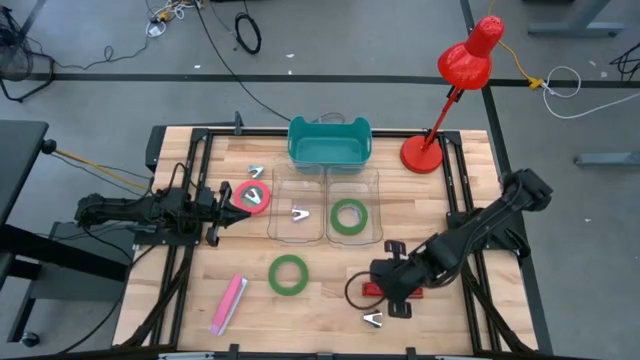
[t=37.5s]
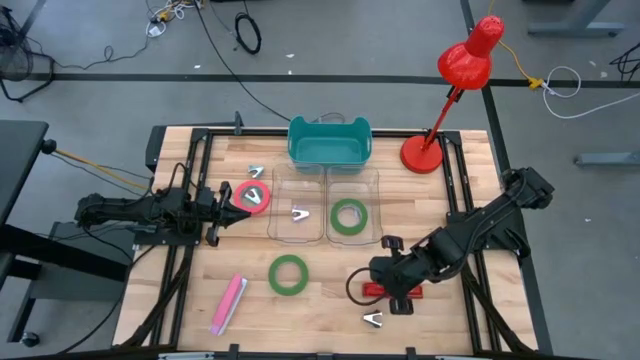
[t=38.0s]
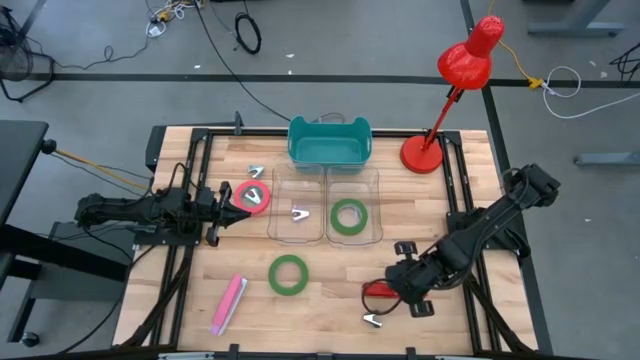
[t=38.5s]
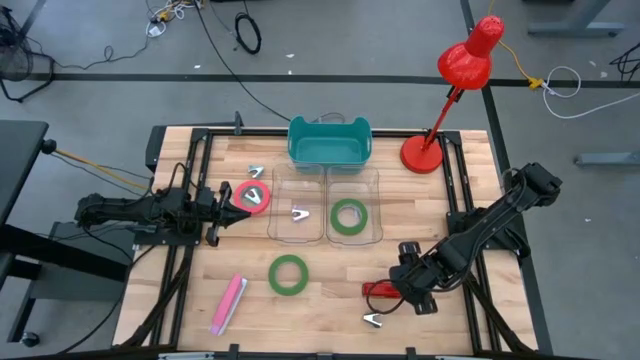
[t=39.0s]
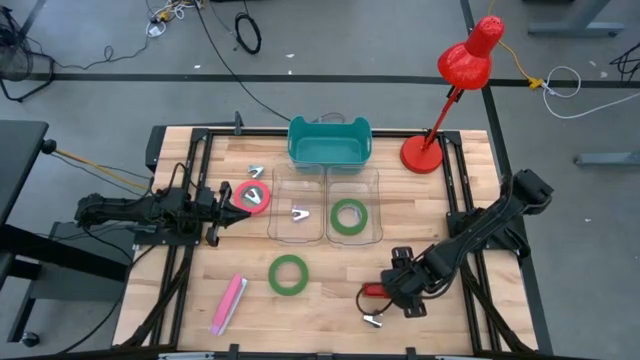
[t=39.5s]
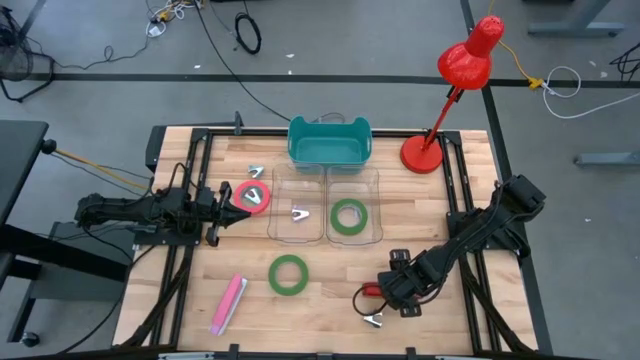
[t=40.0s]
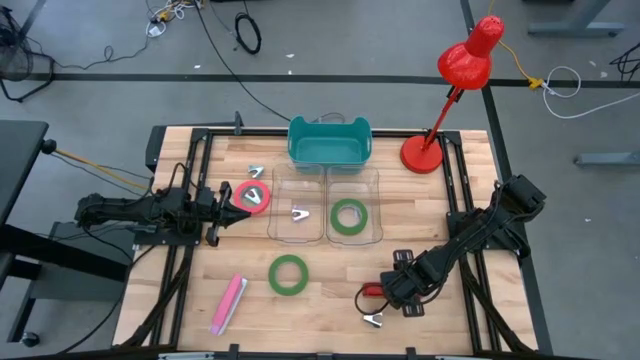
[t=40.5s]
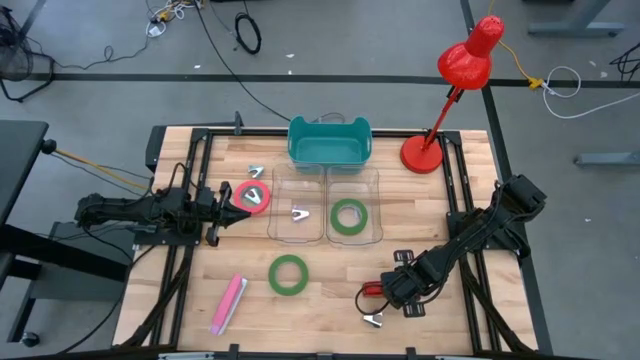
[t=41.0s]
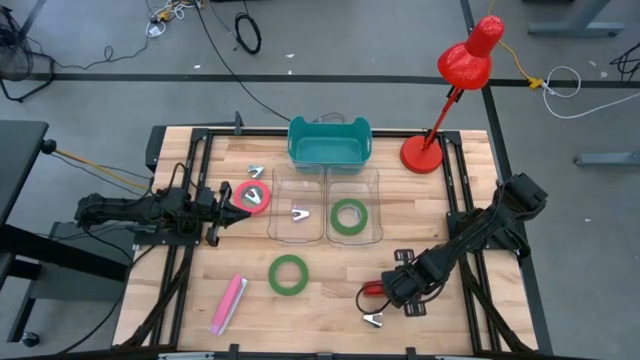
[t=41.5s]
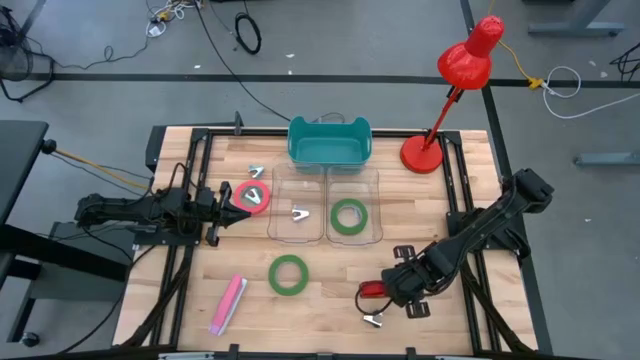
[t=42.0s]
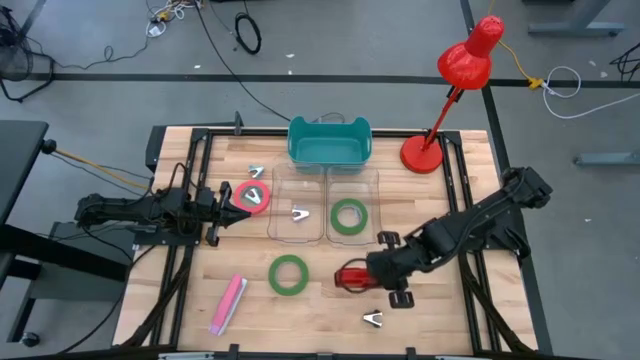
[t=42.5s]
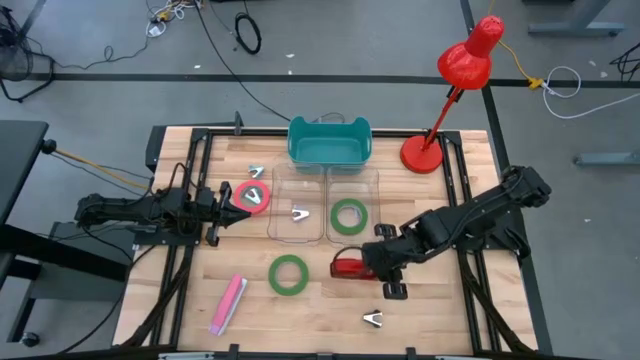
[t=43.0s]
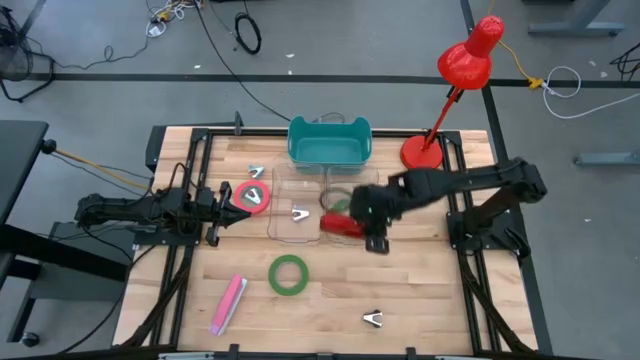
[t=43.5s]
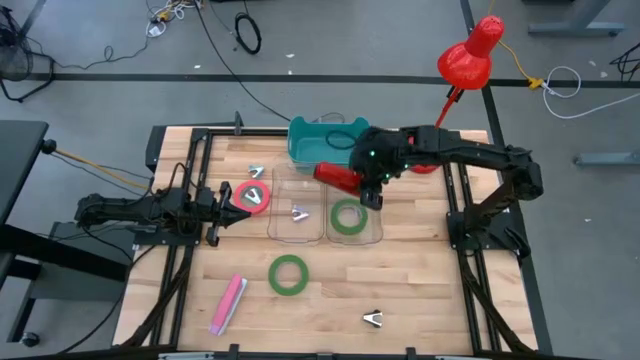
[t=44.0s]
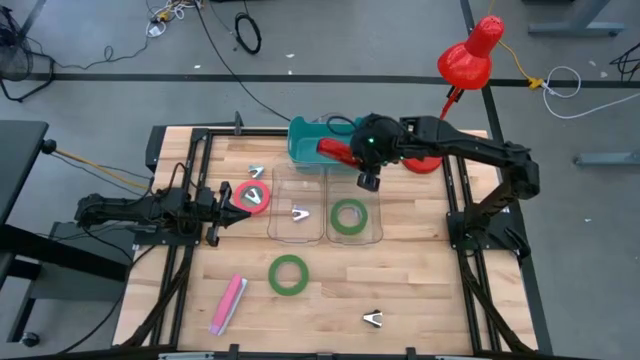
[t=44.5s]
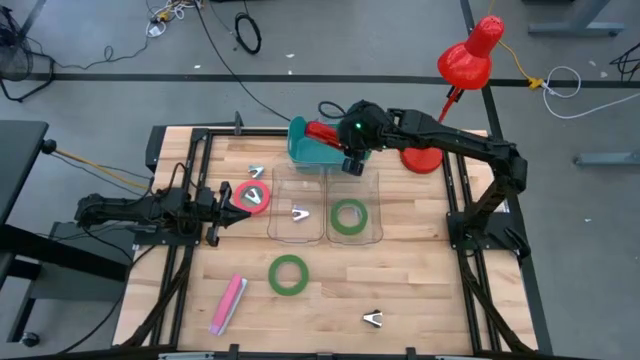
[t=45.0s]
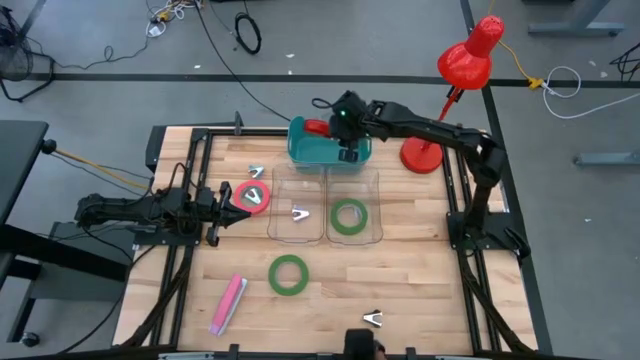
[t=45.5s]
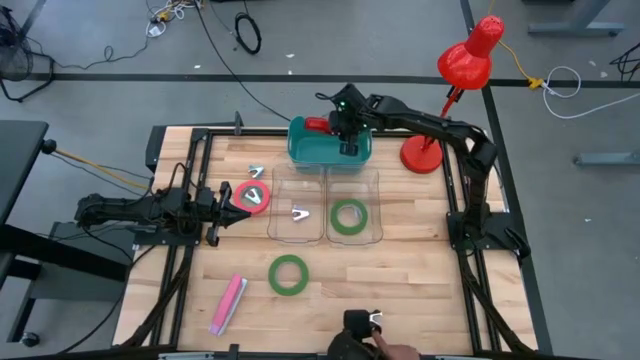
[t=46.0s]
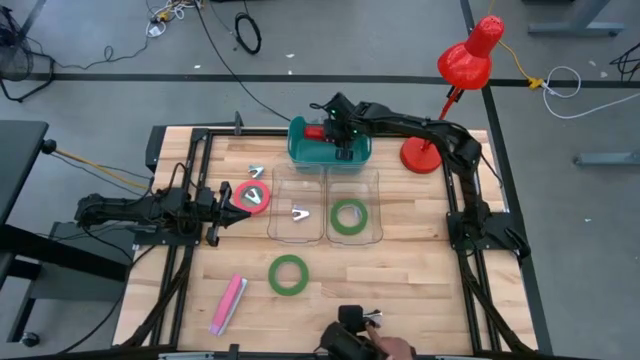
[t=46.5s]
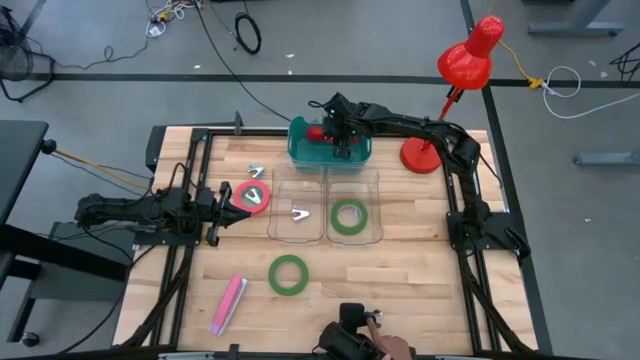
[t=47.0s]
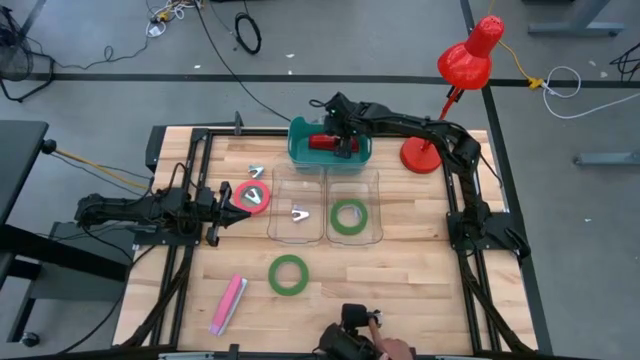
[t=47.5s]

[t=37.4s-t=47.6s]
Task: Pick and place Stapler, Stapler remover, tape
Put the red stapler into the blue bin

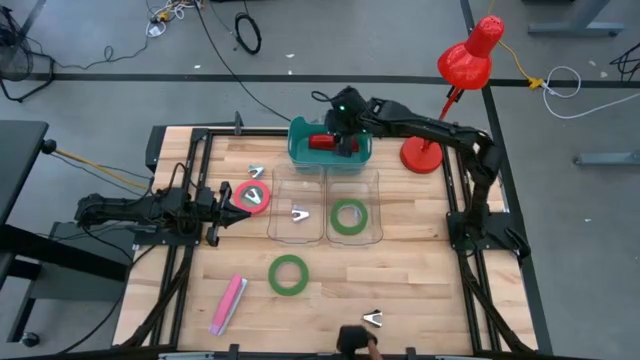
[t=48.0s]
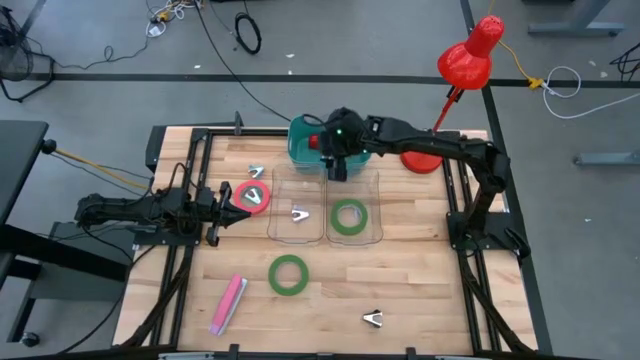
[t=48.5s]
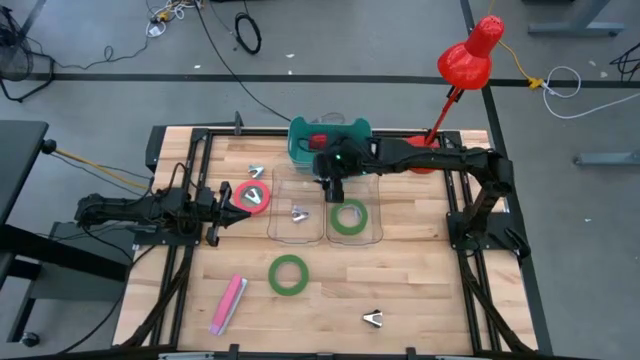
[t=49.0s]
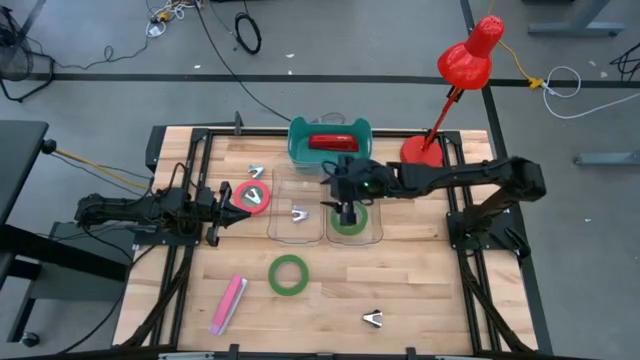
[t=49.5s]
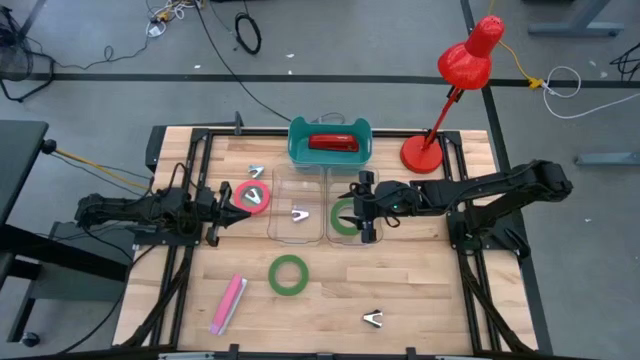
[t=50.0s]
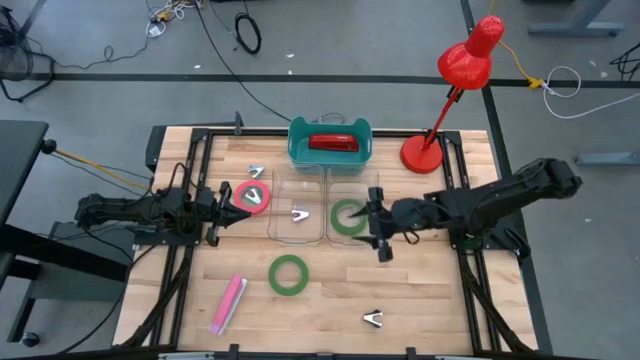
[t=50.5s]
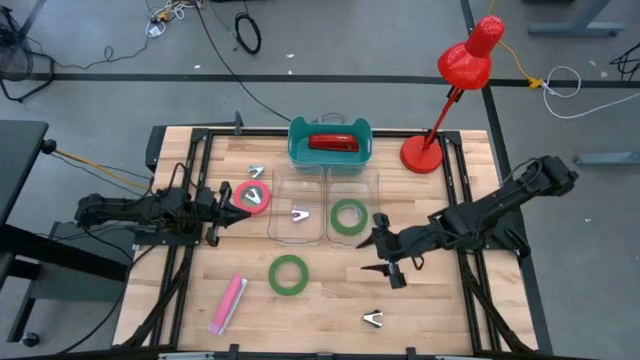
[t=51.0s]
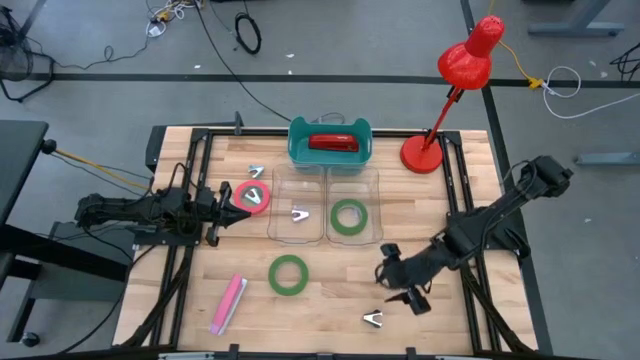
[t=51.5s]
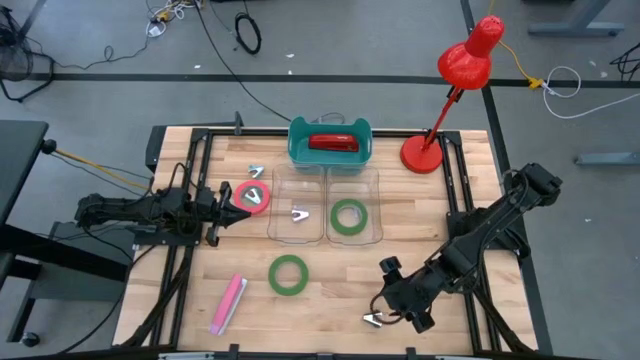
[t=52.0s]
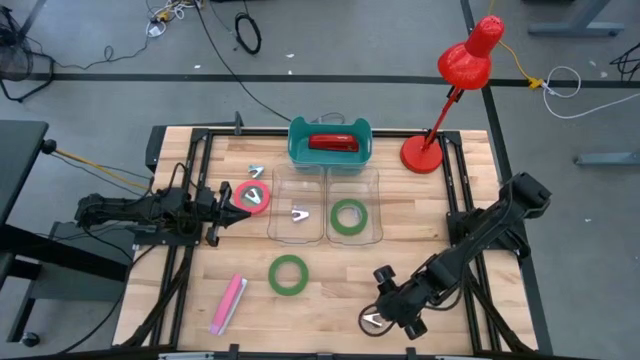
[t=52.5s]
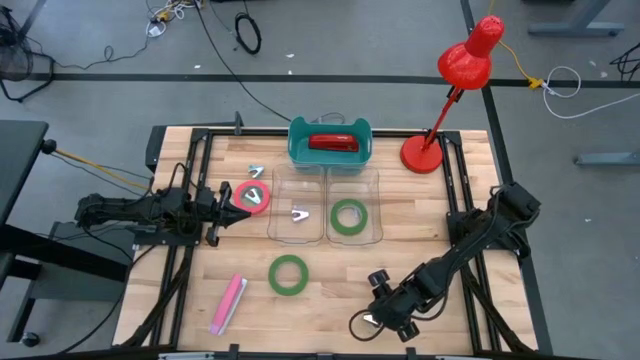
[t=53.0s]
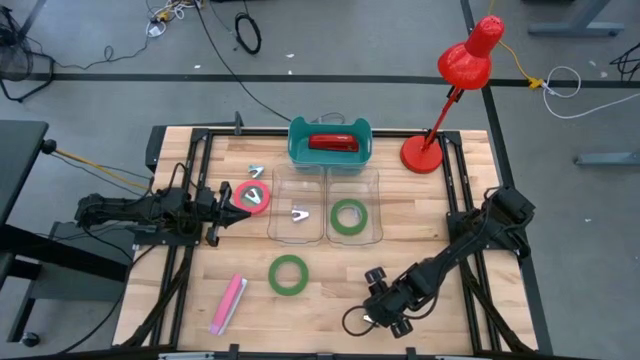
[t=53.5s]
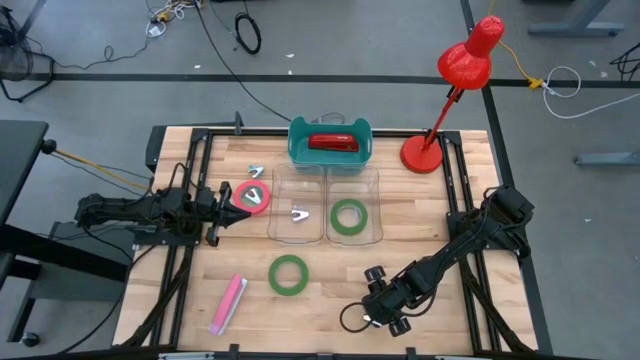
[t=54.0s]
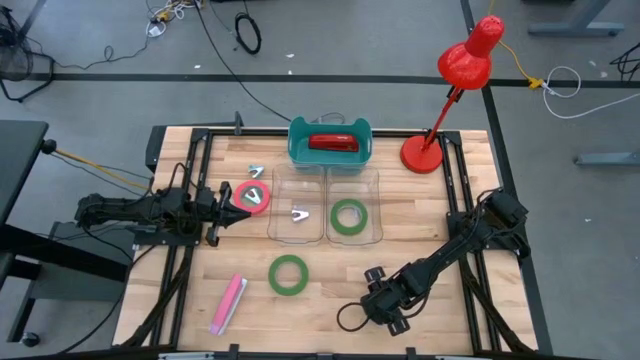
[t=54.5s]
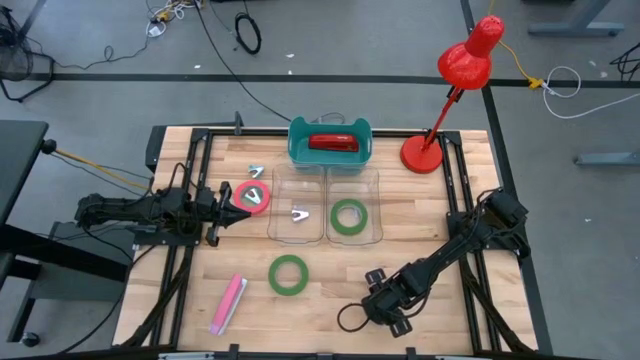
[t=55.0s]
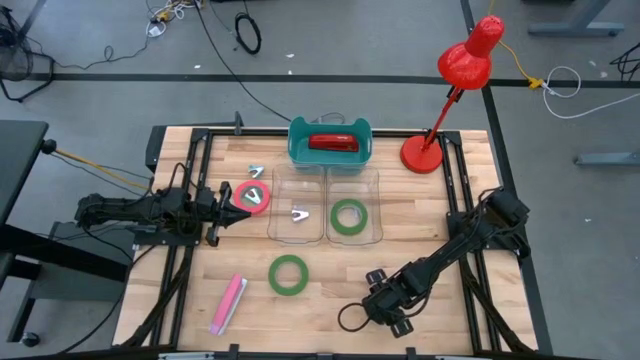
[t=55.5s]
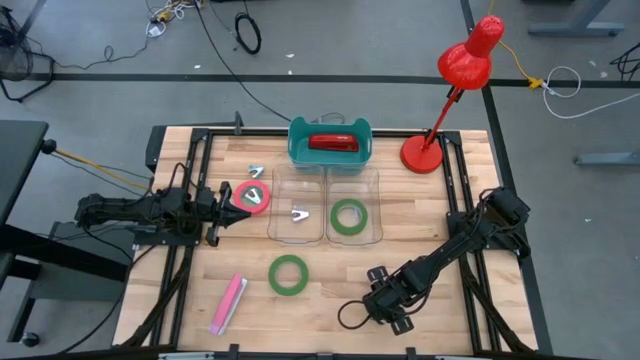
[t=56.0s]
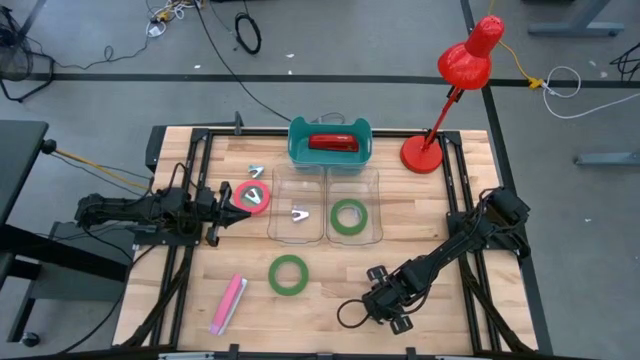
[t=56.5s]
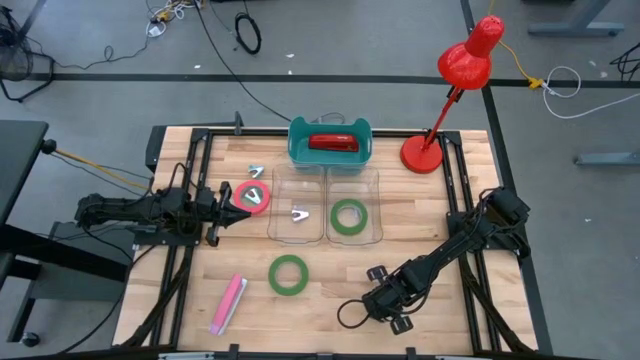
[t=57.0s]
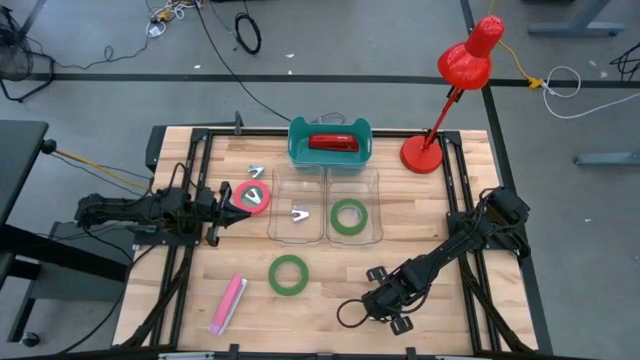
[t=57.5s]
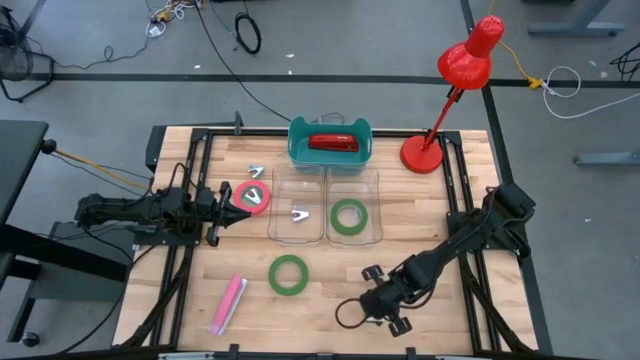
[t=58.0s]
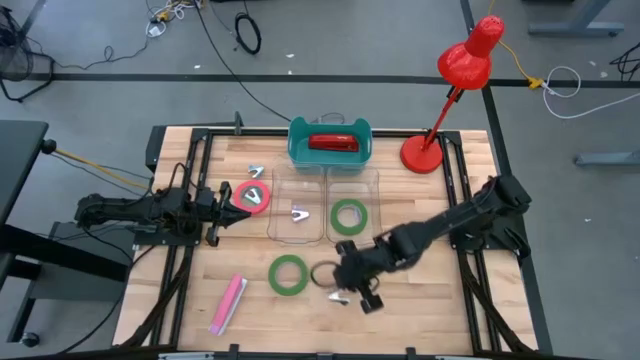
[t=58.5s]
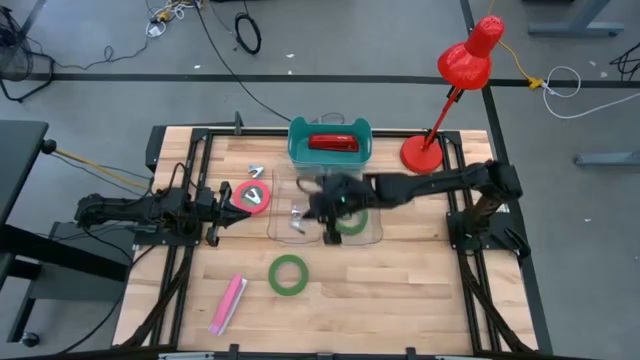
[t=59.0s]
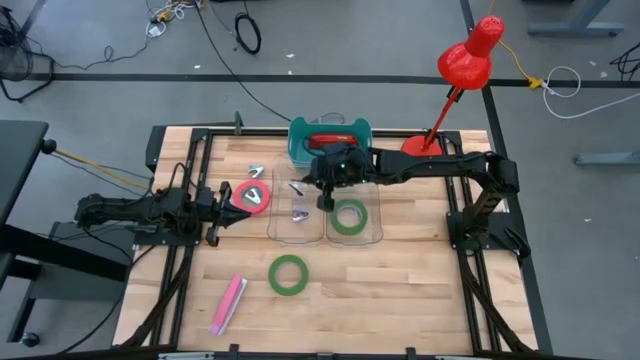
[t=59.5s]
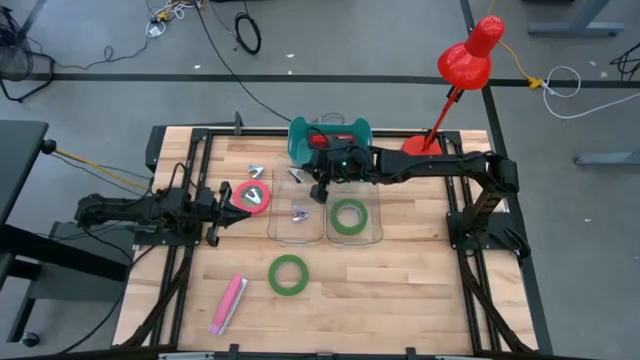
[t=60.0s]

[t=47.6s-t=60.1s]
Put the black staple remover into the left transparent bin
